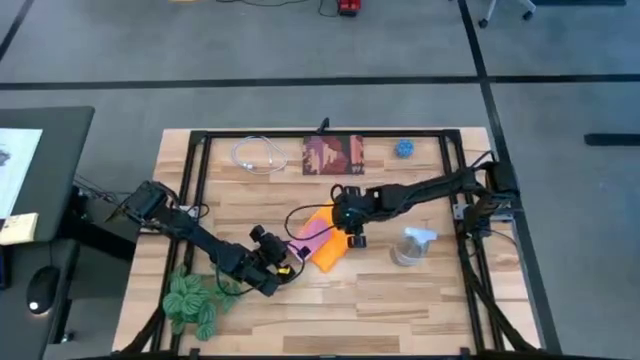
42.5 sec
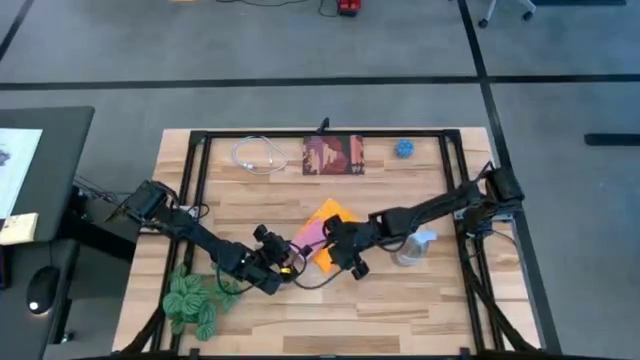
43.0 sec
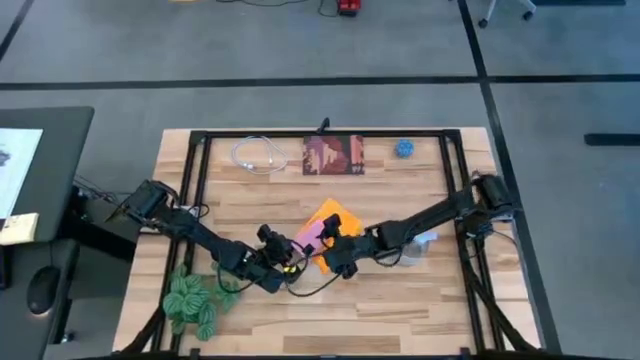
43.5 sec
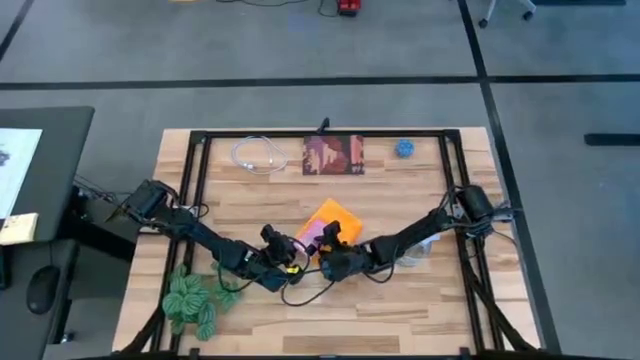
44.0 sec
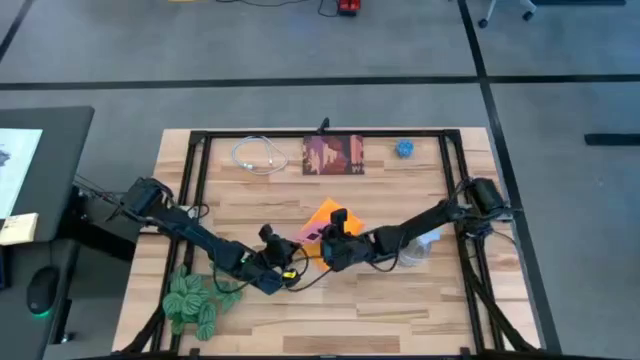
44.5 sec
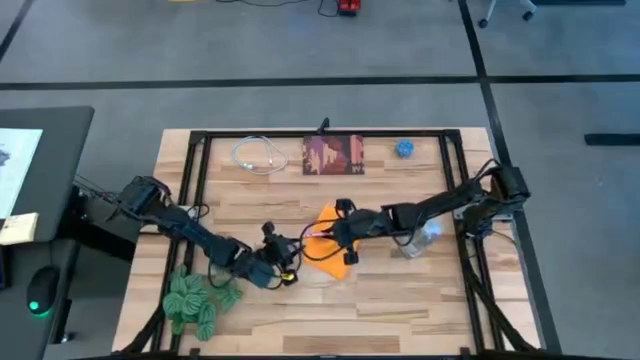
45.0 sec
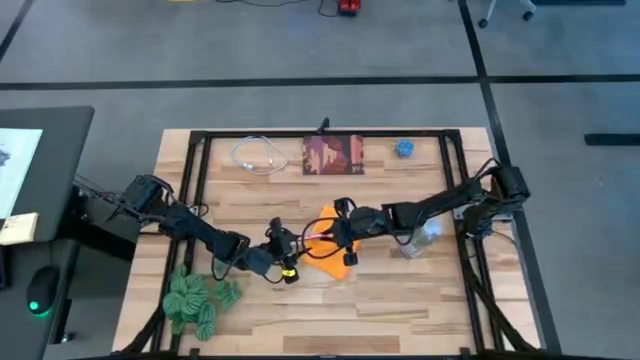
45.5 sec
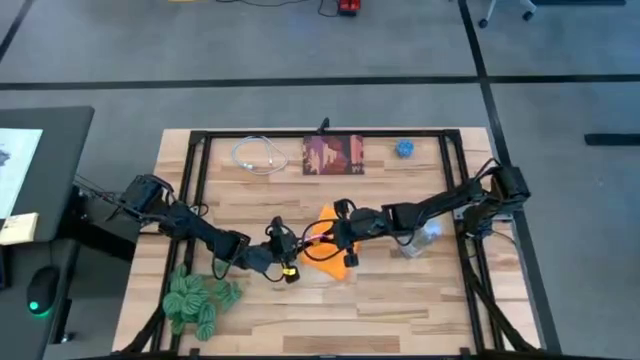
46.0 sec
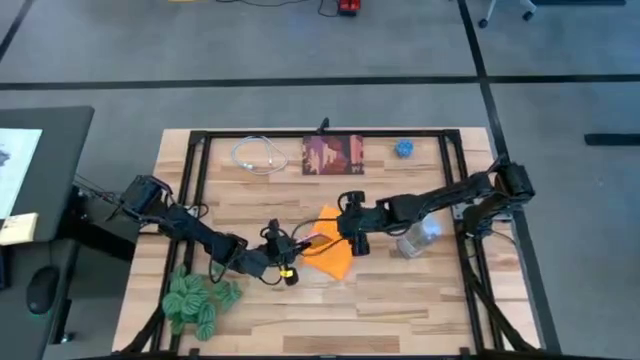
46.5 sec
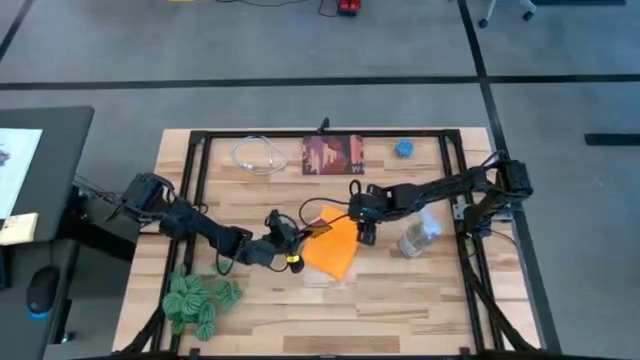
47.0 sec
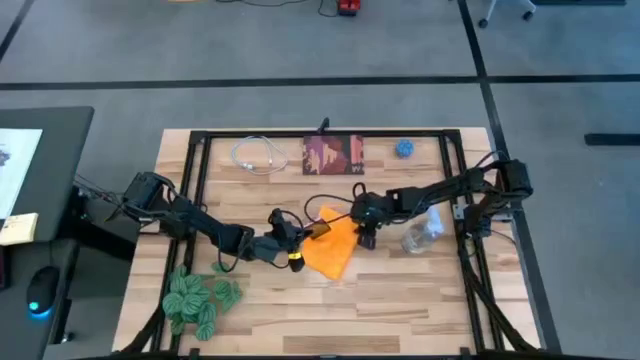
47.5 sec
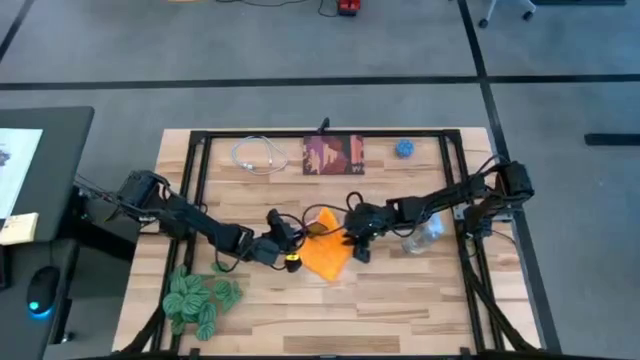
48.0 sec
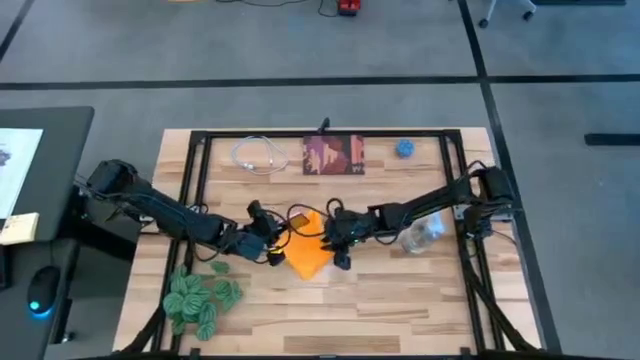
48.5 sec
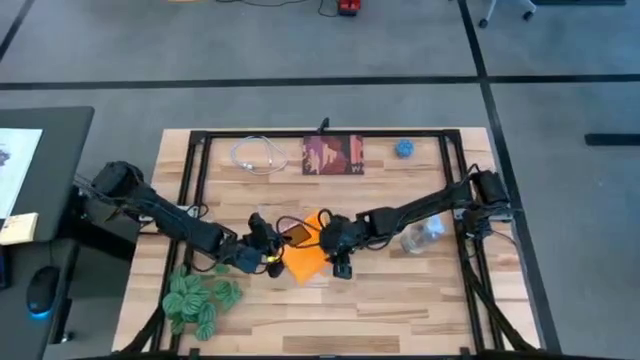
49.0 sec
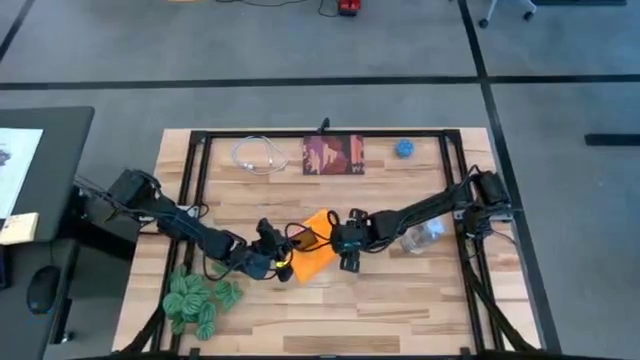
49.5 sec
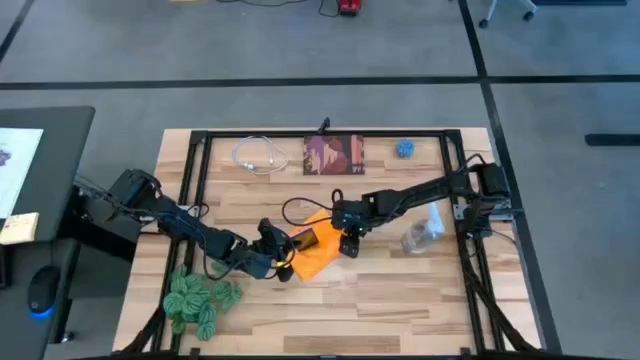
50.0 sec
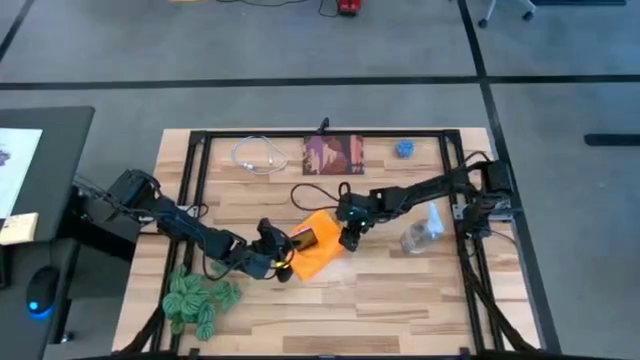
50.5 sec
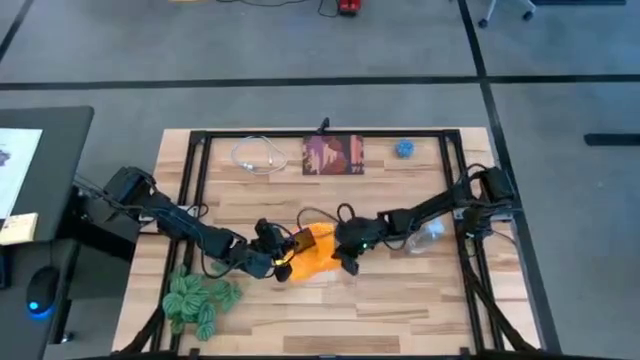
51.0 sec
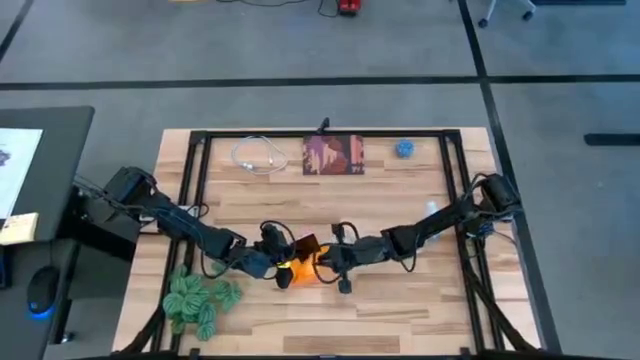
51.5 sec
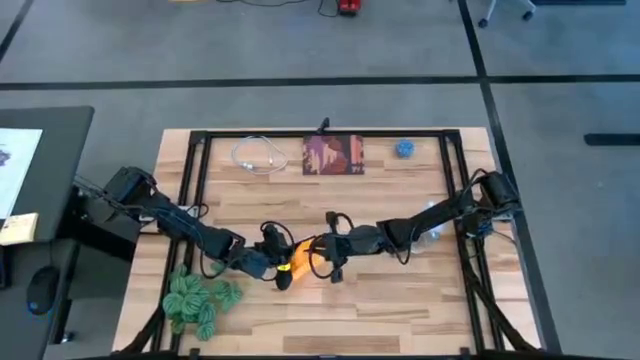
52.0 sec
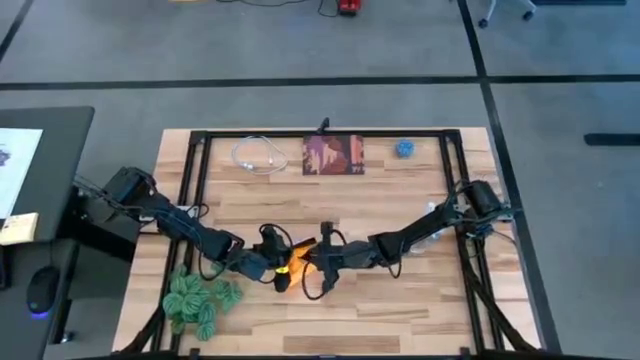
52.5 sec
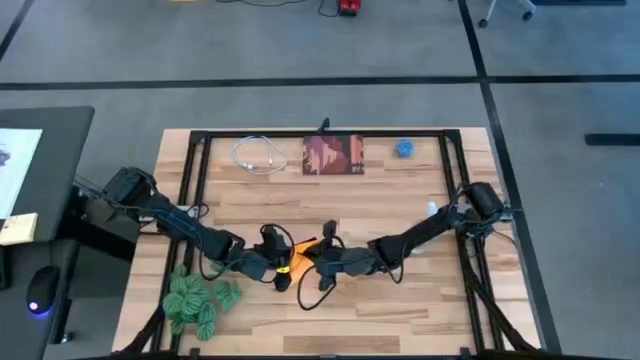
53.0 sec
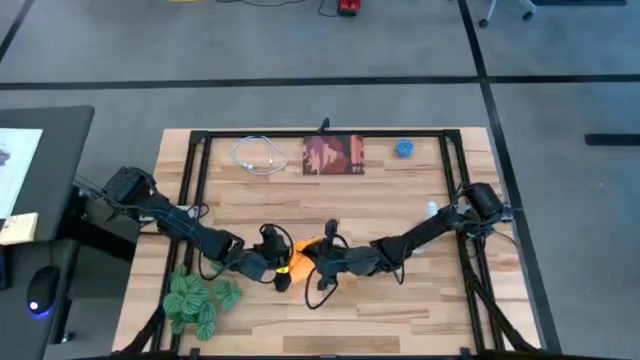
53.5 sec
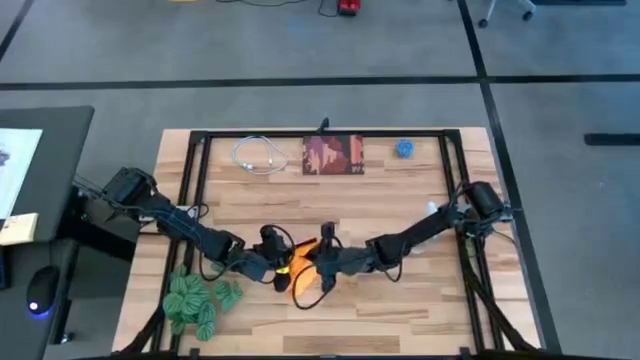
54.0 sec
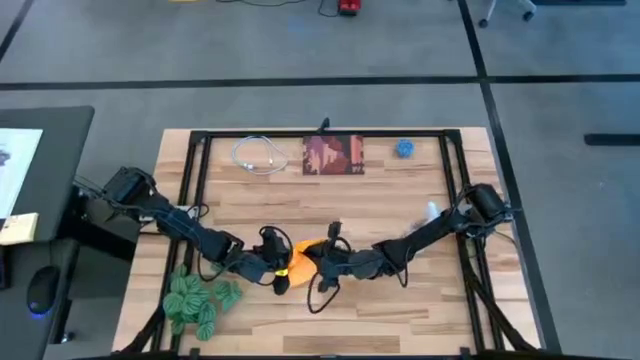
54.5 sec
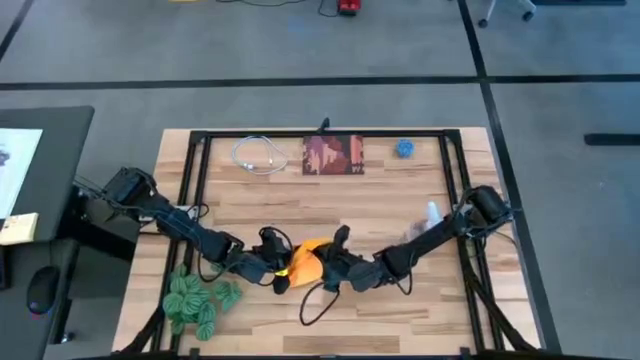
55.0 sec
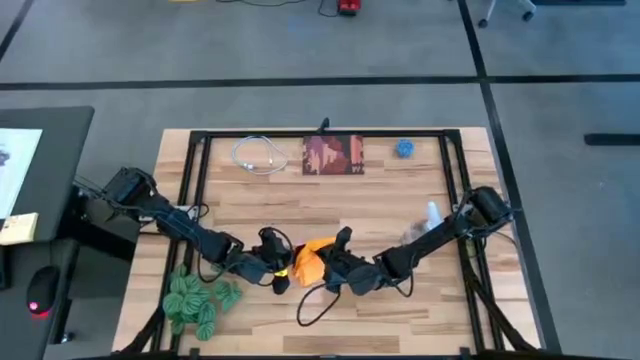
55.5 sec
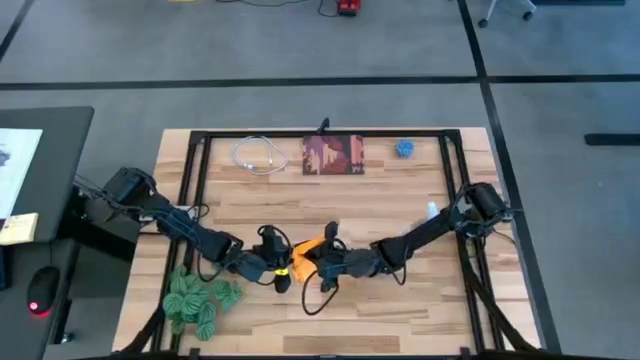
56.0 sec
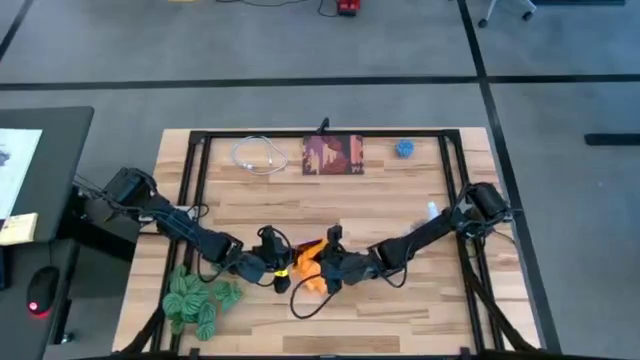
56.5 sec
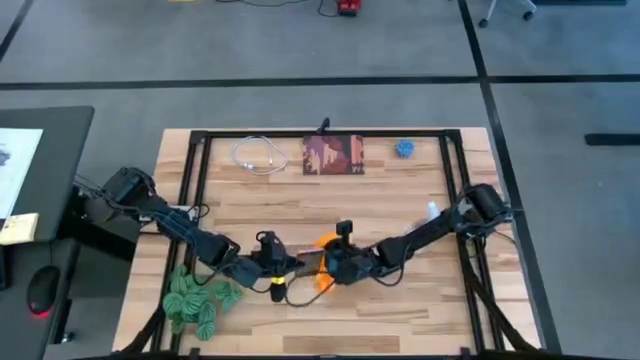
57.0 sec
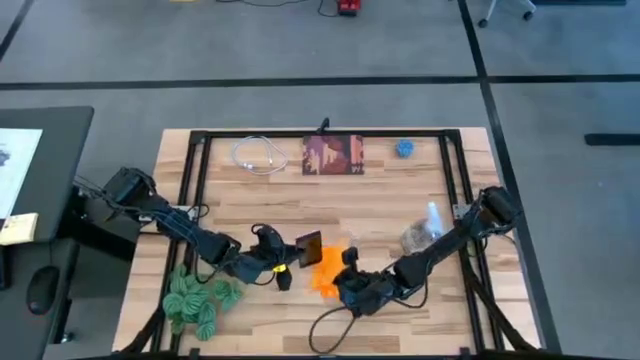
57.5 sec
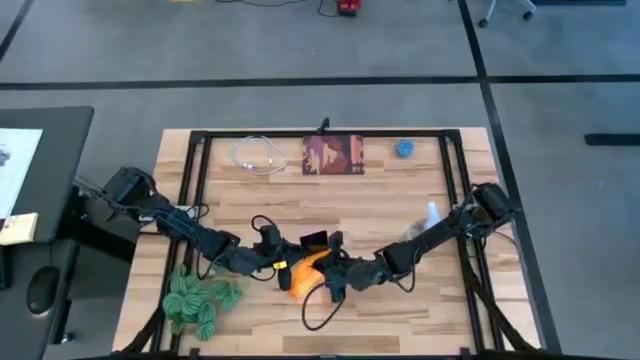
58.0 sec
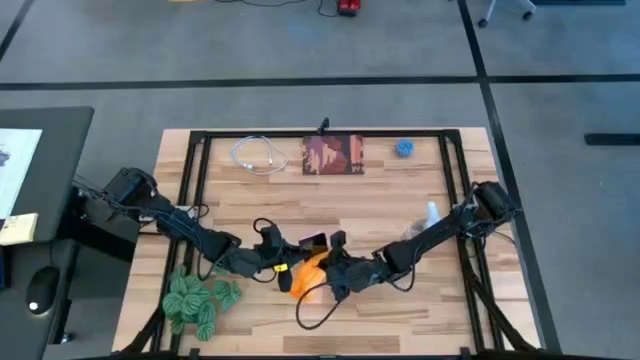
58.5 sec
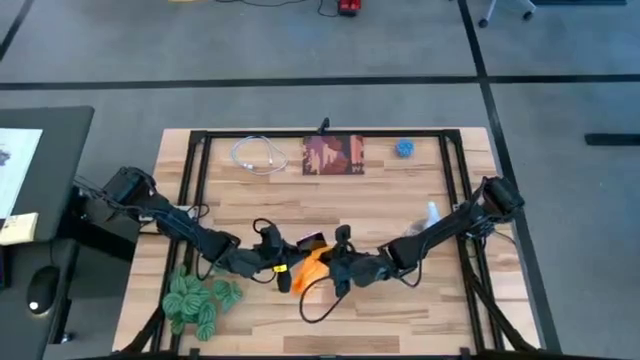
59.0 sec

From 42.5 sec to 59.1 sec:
Task: Apply microfiber cloth
Wipe the front of the pink cellphone using microfiber cloth
